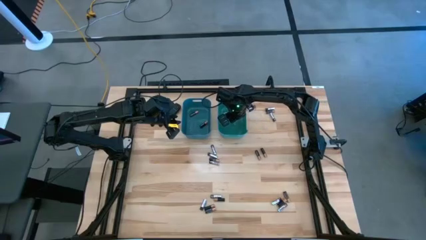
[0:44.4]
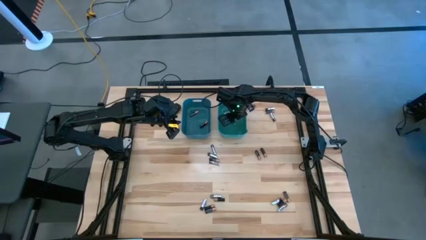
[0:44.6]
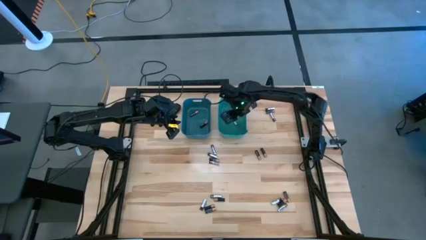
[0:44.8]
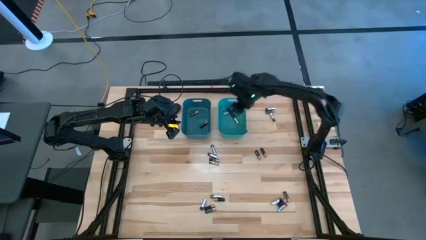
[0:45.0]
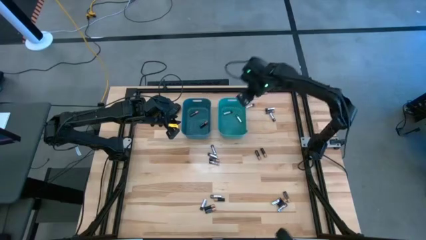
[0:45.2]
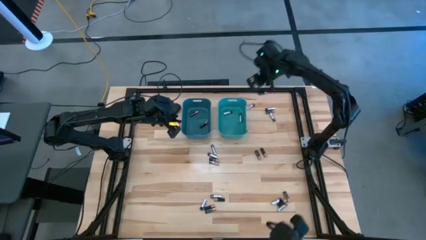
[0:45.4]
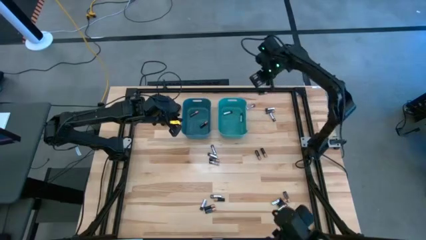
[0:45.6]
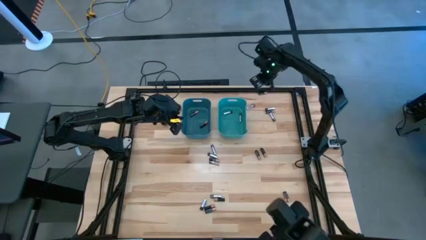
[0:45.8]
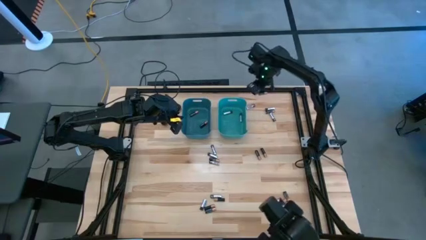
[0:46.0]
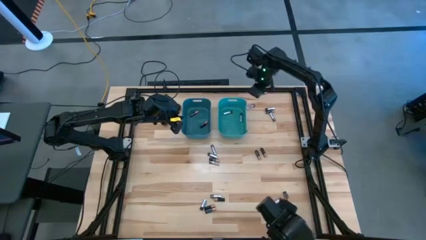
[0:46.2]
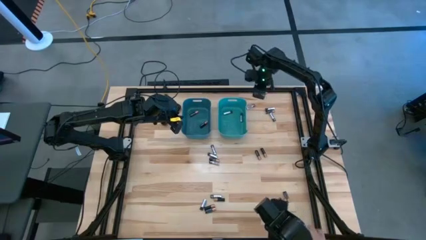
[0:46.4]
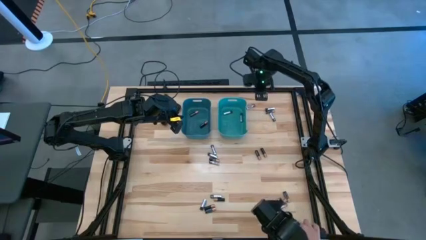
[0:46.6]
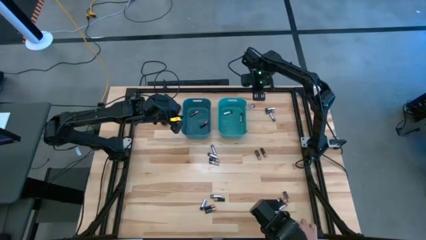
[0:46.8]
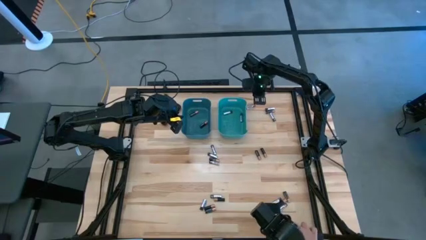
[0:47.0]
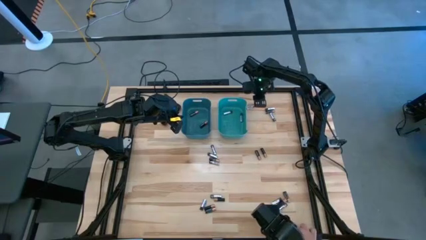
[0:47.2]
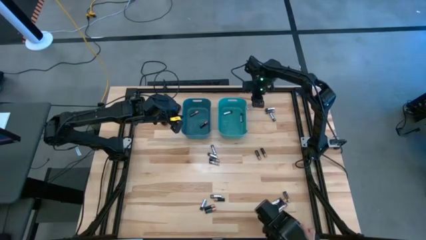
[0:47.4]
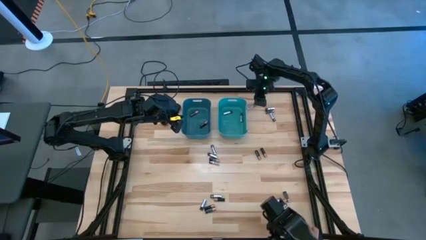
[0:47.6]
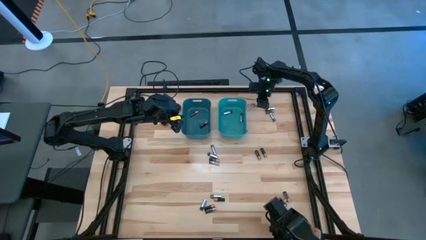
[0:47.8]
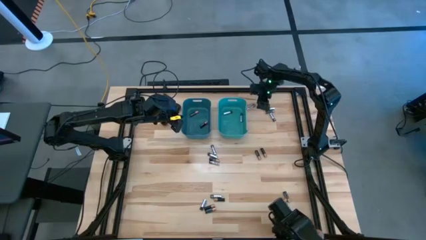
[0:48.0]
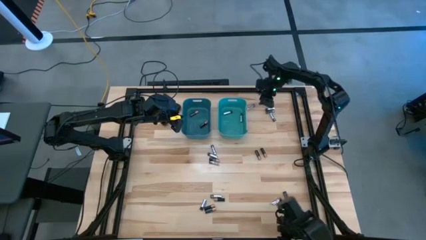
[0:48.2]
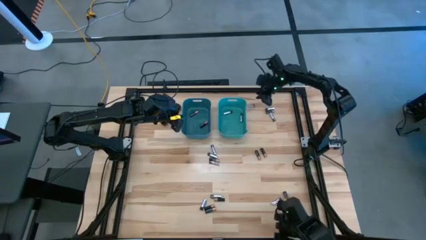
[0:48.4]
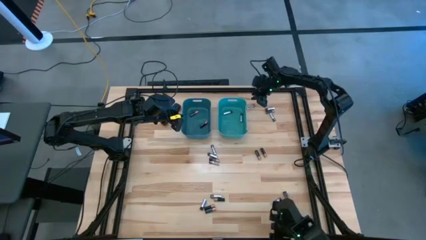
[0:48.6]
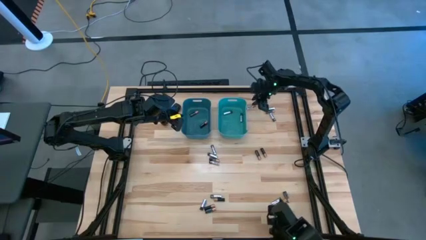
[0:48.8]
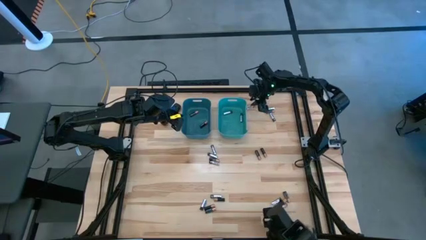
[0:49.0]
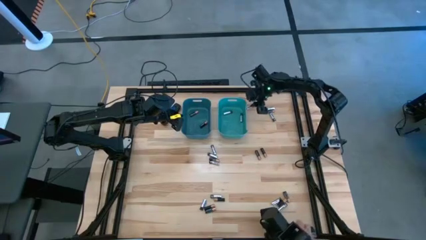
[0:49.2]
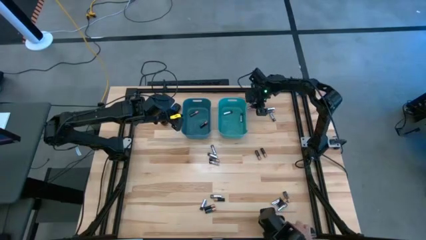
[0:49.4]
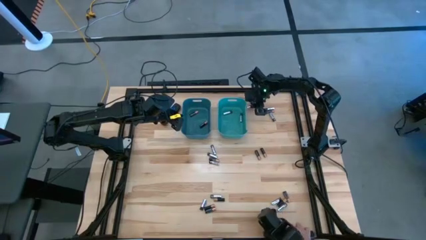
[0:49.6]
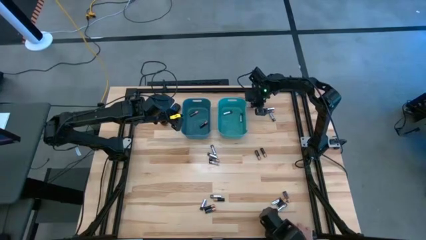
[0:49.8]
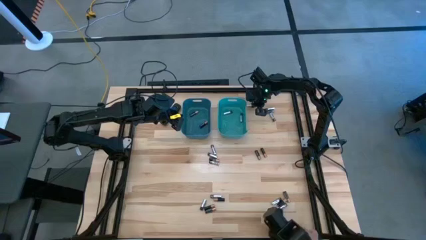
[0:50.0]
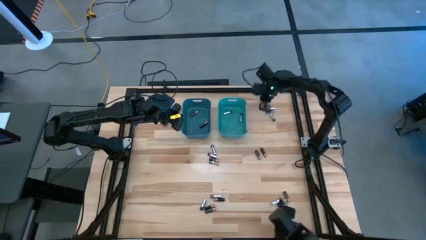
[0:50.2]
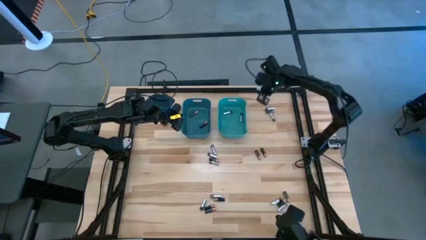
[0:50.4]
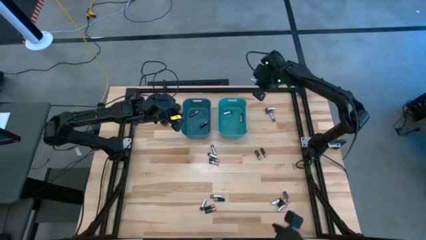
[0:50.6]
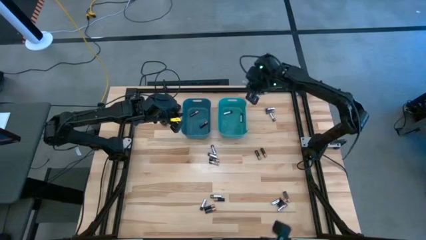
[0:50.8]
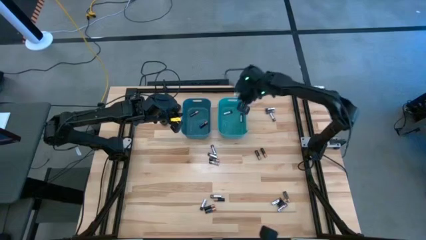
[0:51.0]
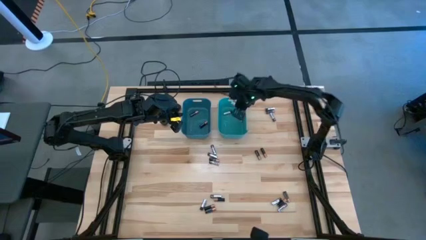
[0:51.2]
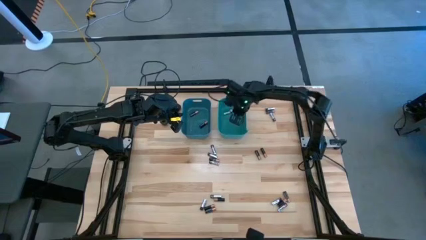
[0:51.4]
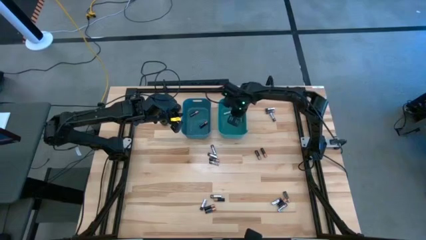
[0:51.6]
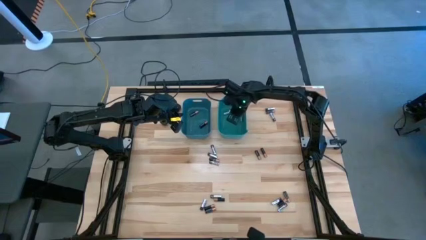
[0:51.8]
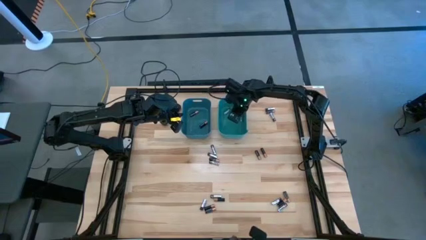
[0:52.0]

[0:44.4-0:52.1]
Task: Sort batteries
Put the silver battery into the green bin

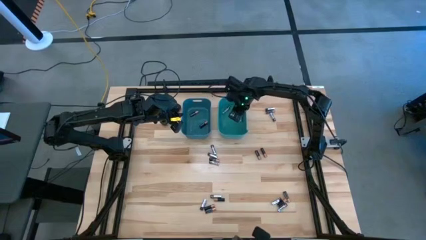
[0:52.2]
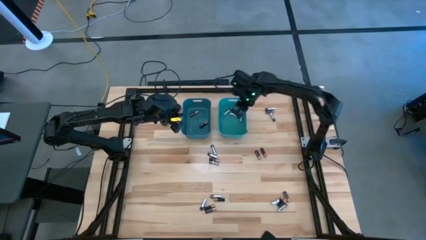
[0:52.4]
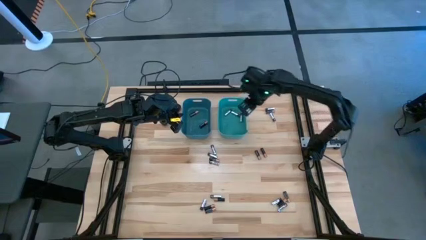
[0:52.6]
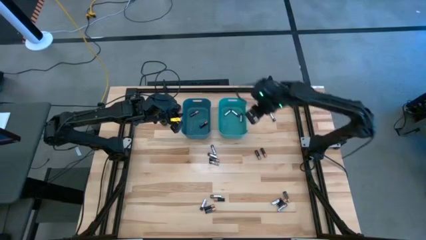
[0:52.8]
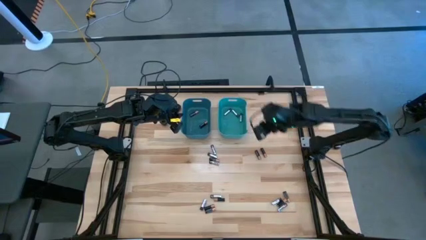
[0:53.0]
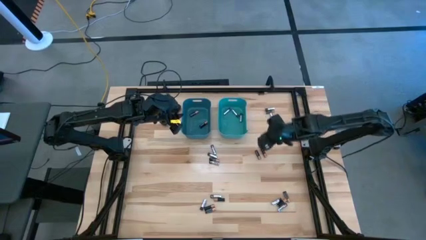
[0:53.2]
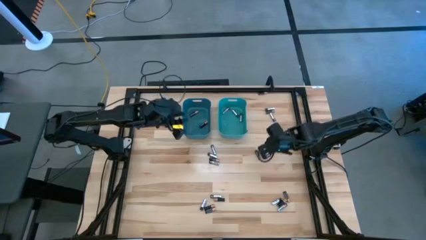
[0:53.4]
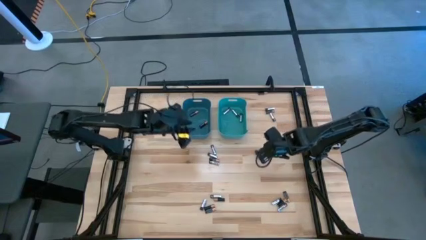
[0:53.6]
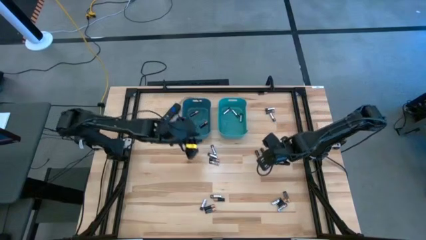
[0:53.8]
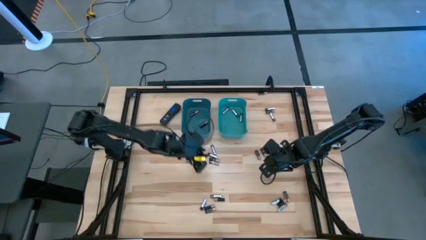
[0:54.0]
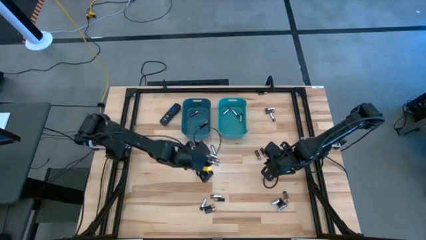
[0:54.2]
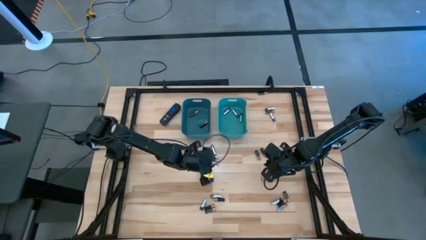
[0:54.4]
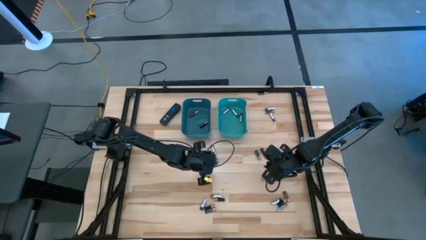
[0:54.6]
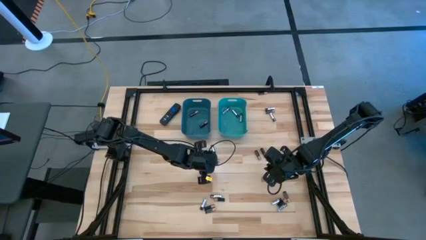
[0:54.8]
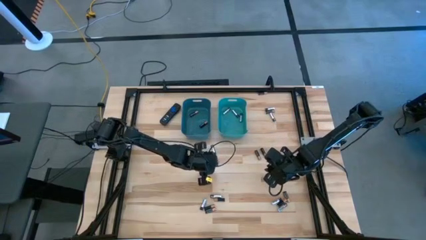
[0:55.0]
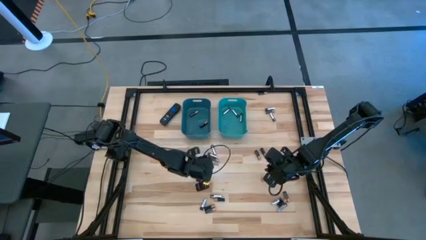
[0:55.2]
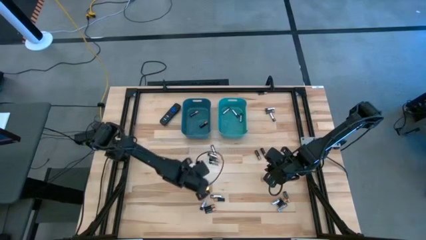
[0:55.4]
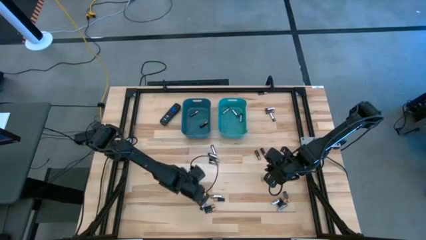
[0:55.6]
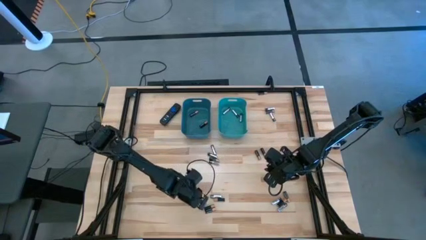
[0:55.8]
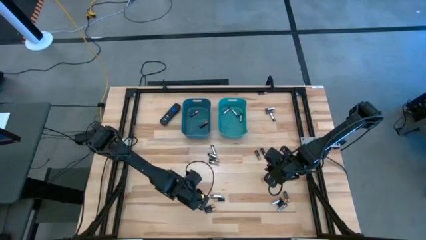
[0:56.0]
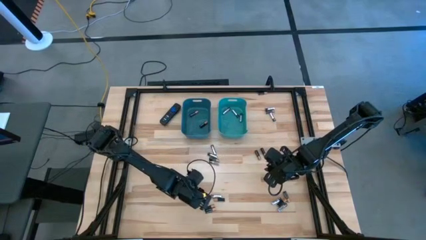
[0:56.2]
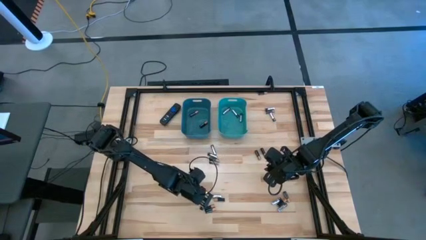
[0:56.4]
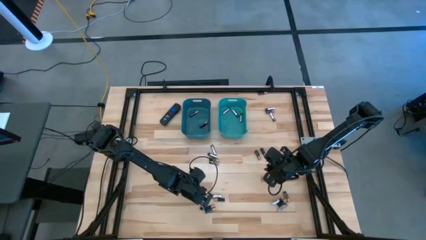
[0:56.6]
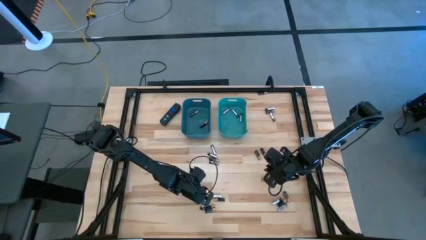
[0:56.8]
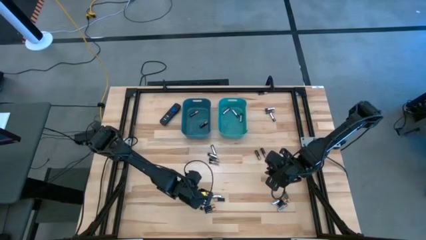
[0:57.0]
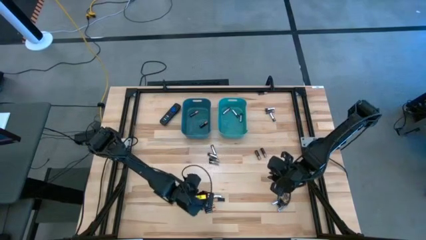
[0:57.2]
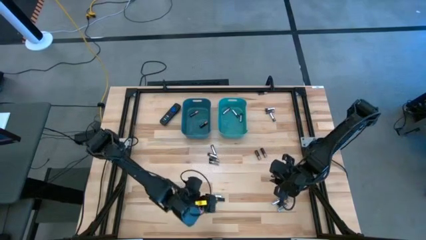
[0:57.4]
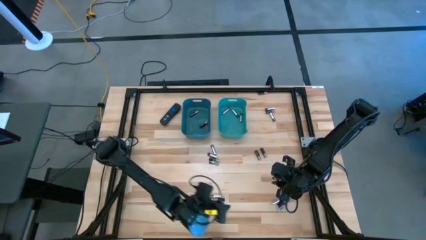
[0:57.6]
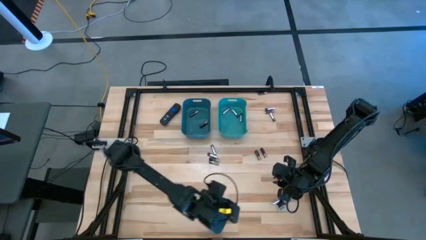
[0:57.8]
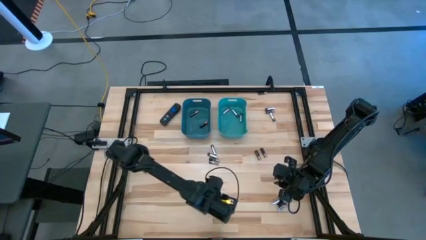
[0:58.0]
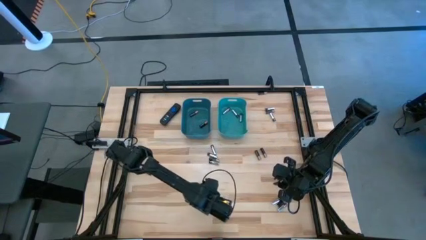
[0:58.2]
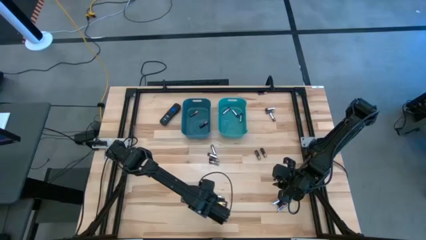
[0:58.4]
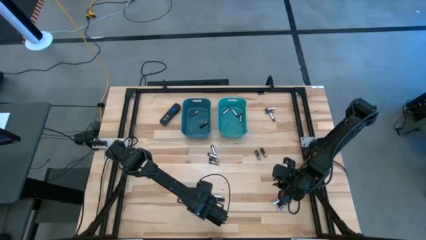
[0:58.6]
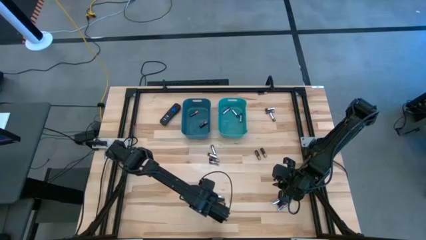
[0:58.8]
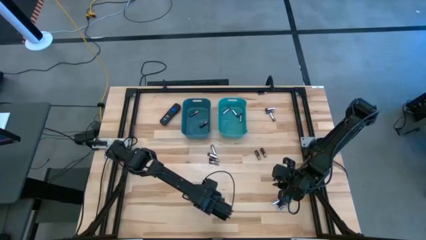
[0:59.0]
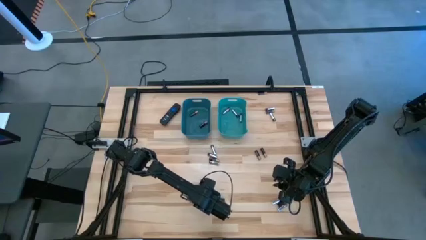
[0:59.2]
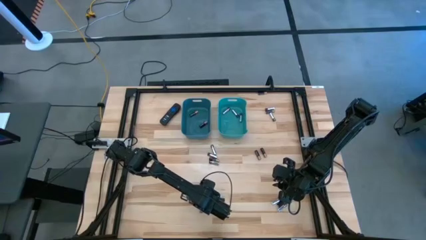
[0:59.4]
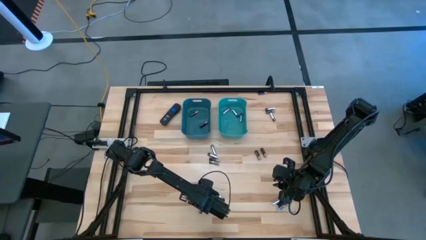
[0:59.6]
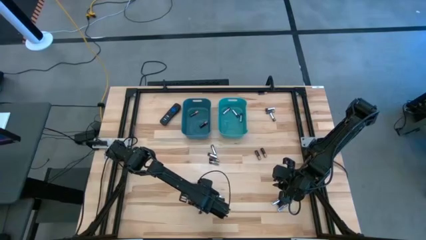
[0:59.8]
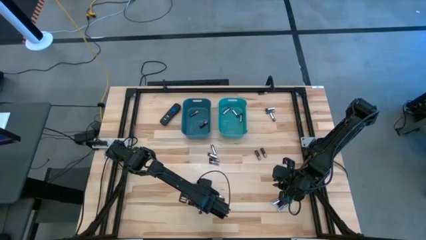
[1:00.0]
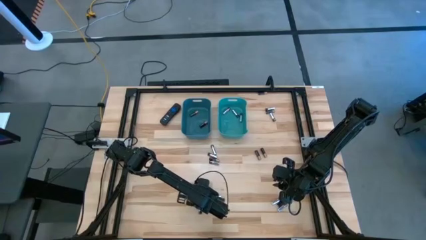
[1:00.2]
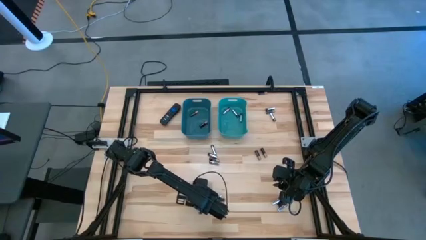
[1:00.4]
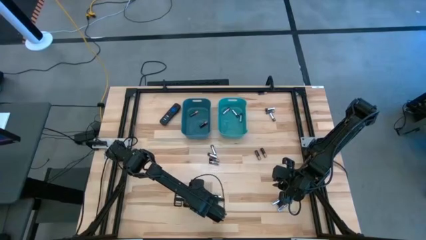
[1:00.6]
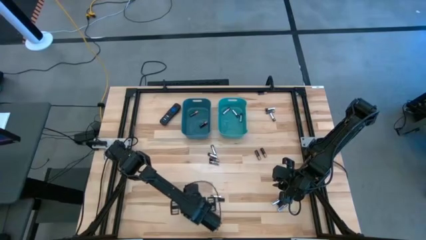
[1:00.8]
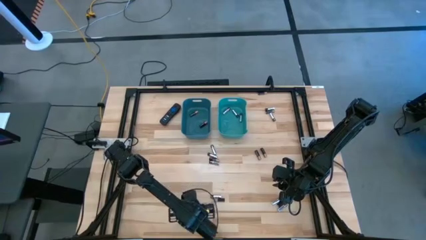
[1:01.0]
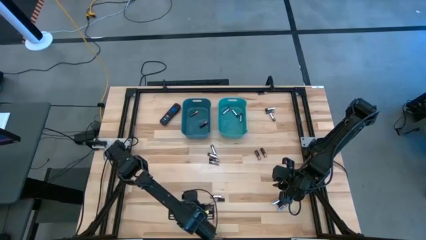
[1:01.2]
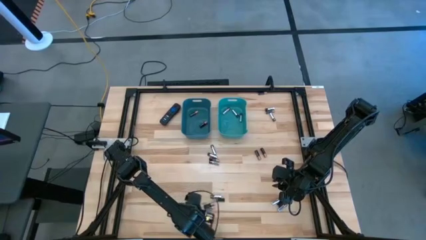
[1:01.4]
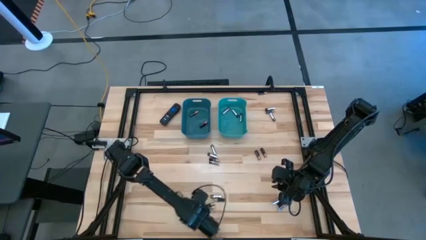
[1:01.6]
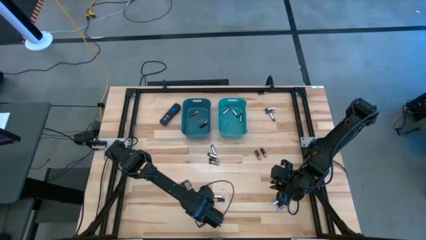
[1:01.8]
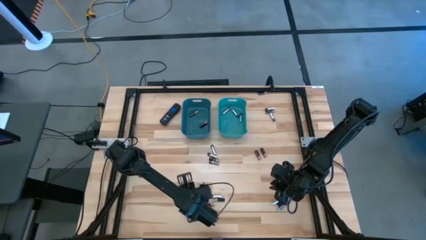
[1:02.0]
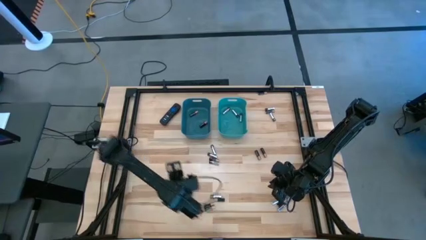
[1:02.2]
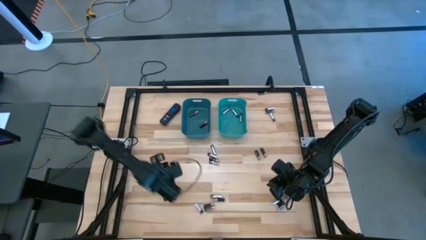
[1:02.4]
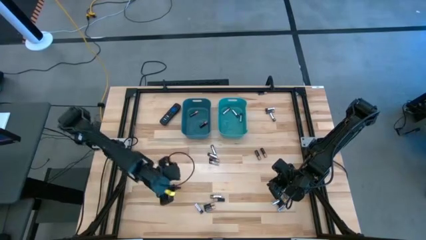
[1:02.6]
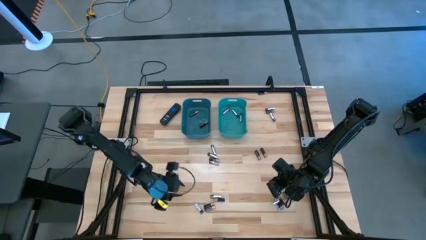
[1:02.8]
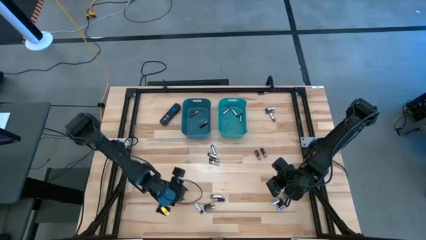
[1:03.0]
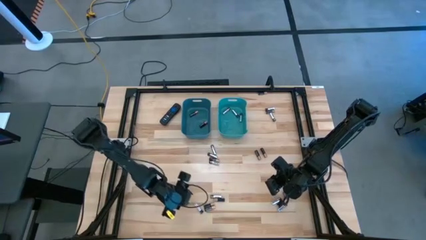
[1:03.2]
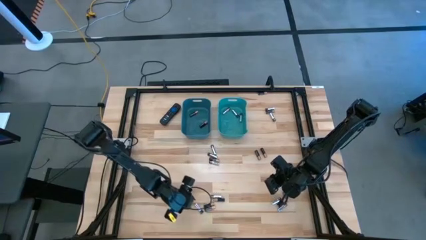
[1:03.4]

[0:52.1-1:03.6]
Put the silver battery into the green bin
